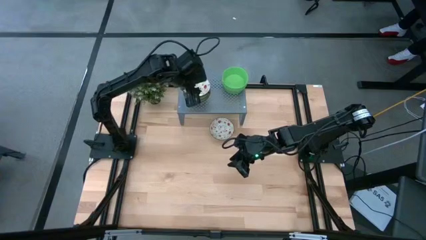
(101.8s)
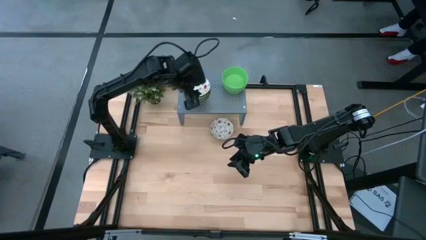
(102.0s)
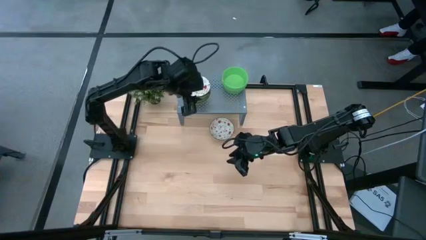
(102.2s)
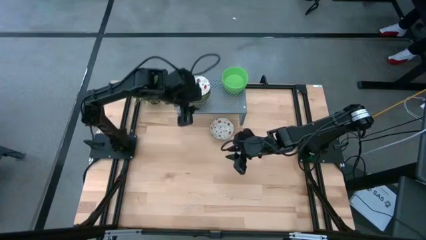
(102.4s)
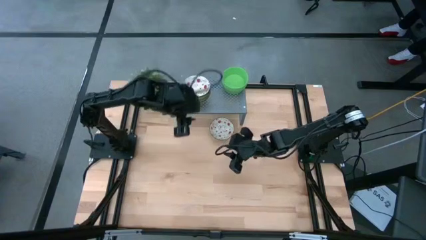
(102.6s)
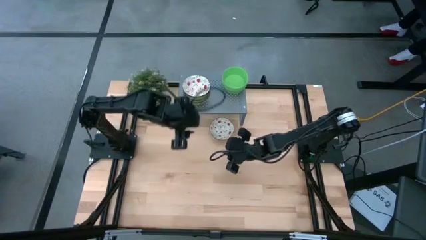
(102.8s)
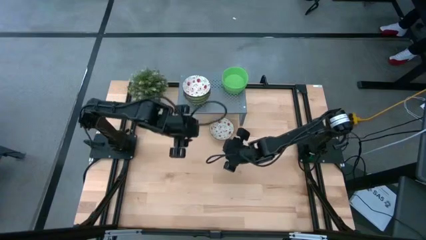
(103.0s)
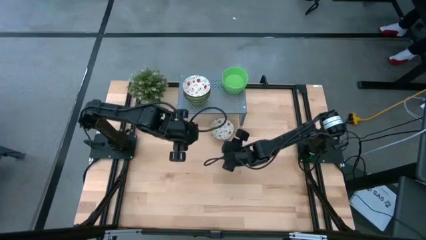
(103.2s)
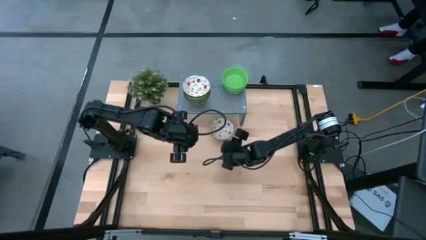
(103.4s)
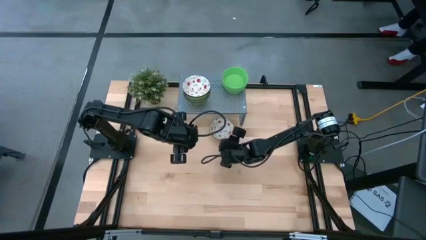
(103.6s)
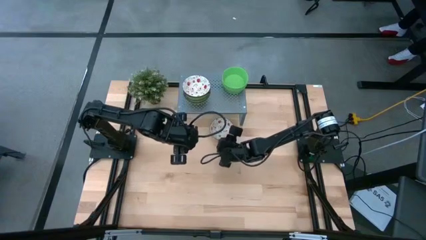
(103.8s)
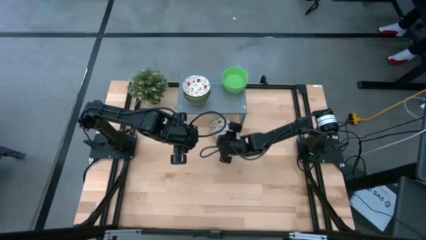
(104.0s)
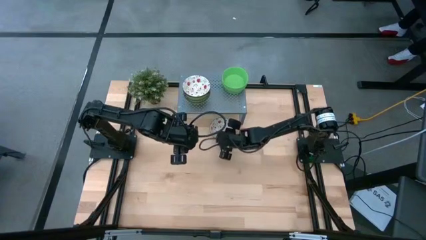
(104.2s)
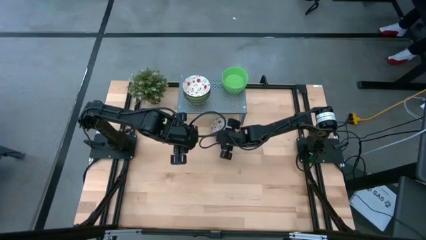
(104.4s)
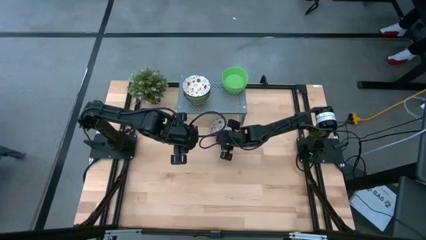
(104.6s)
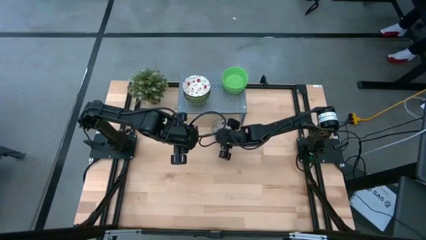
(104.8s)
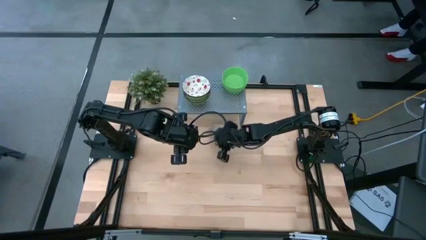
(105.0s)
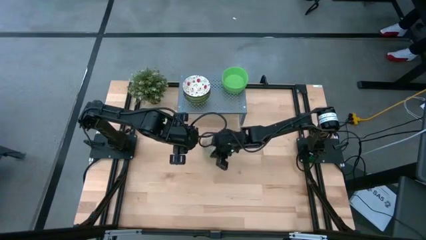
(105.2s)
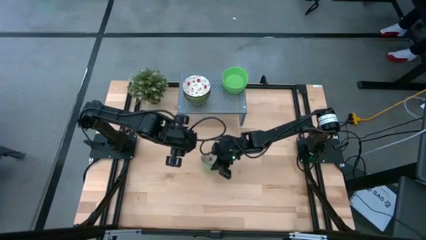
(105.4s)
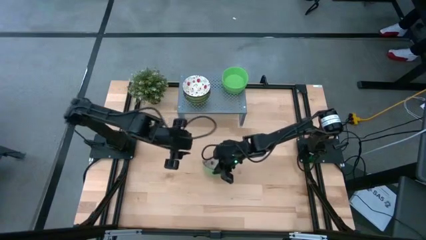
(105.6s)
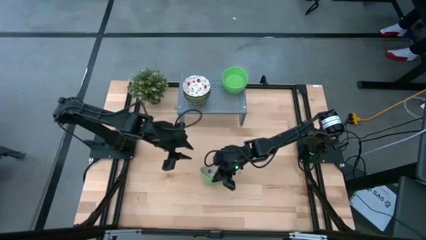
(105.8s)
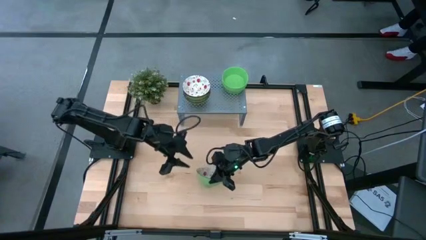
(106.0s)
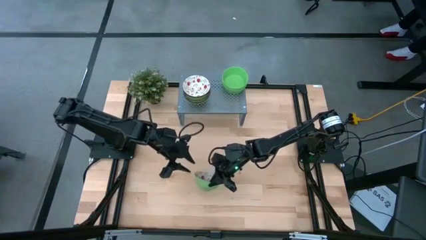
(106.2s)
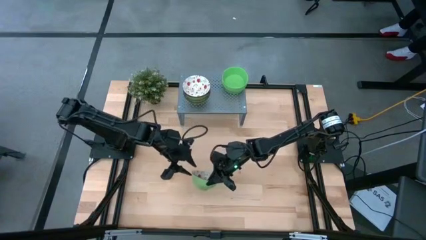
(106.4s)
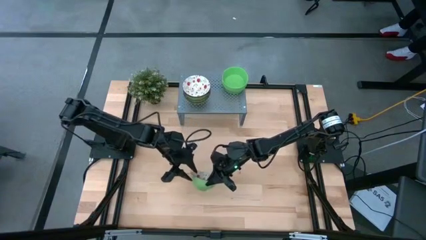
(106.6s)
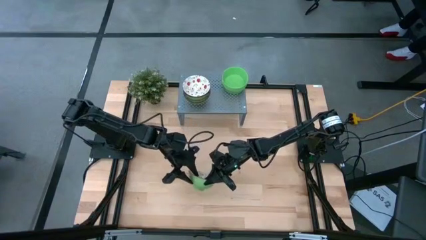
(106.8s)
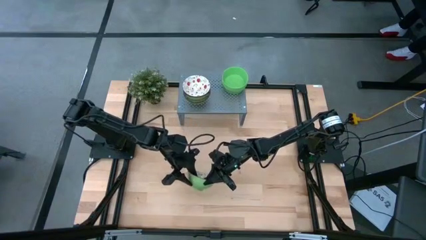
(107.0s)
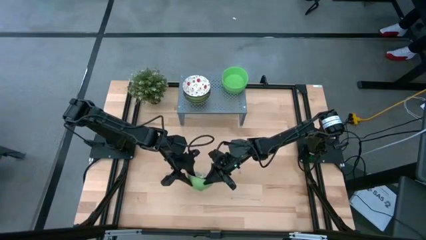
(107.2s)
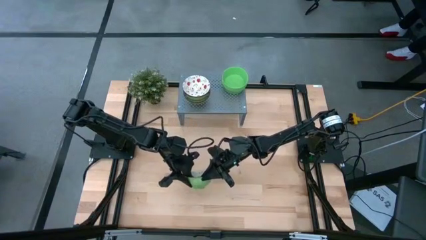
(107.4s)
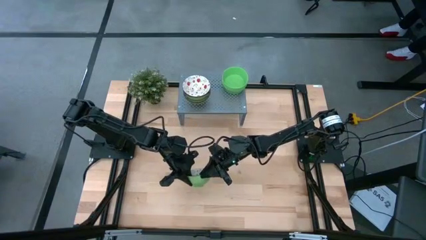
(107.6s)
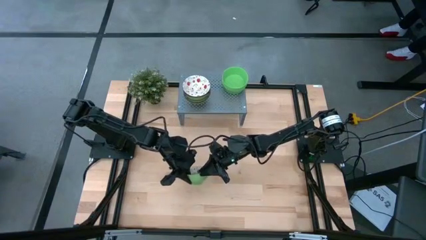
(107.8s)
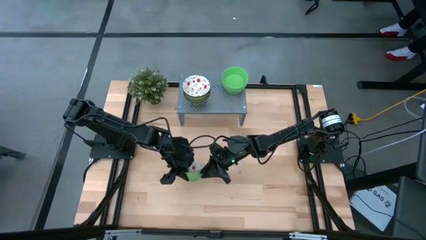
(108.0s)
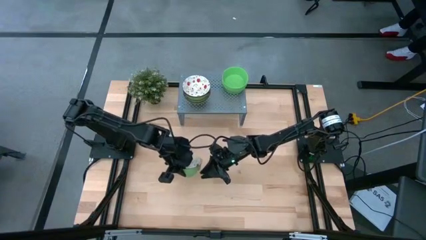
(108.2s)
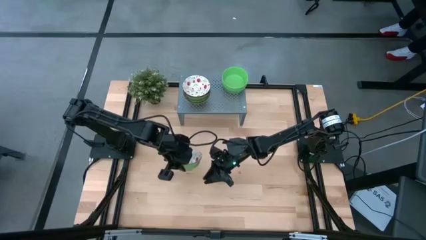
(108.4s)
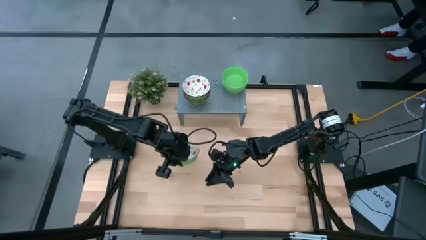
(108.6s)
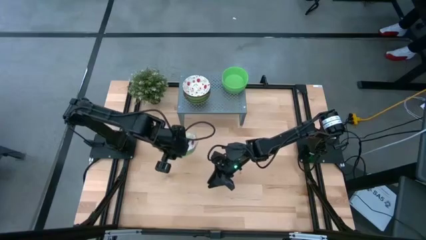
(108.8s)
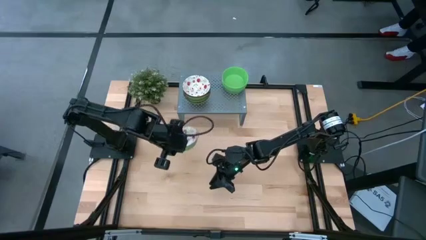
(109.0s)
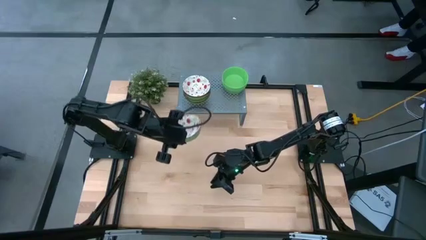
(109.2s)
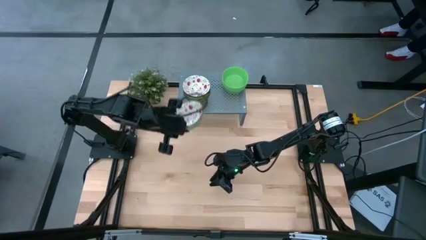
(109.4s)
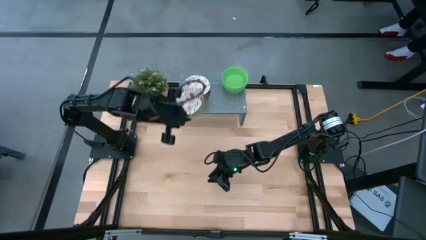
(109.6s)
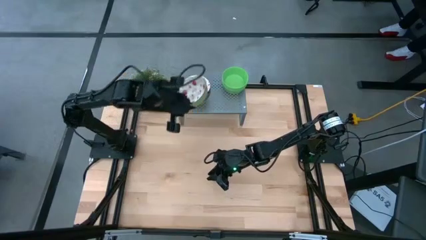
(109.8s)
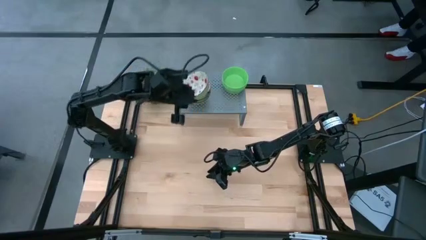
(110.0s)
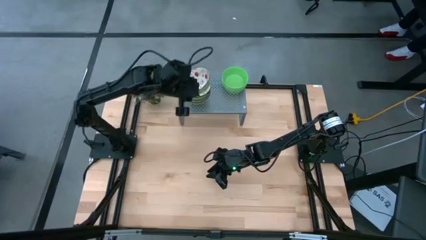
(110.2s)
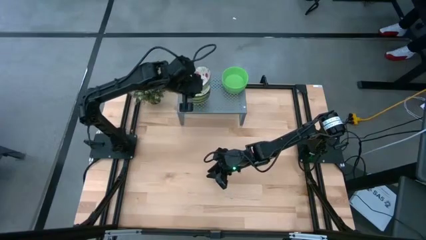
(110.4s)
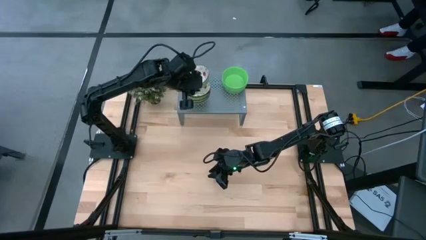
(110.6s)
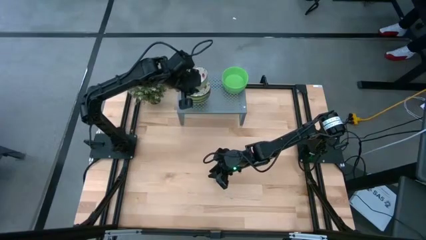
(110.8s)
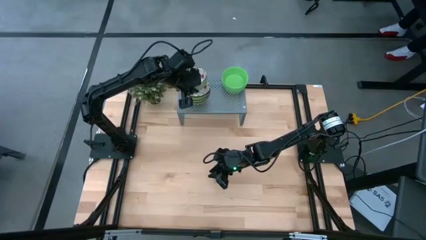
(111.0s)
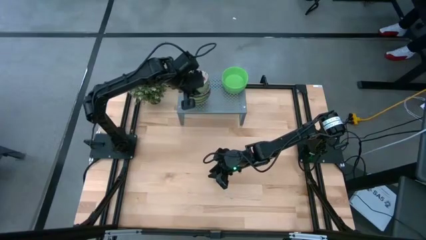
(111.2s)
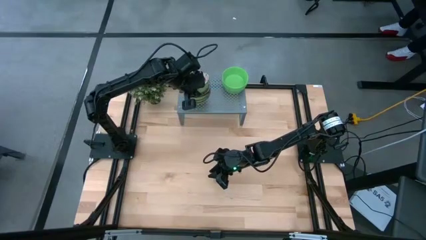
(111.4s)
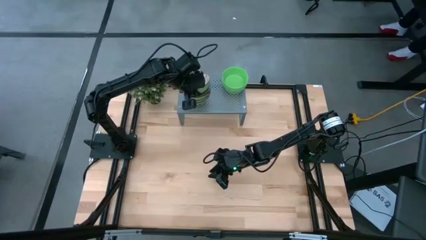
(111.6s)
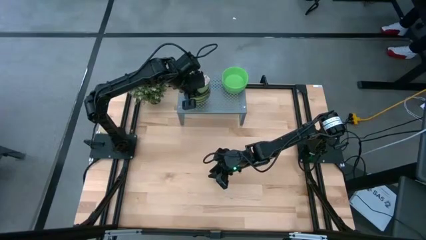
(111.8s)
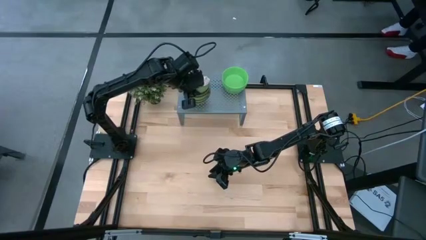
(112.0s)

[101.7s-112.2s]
Task: Pick & Place Mini bowls
Stack the green patterned bowl on the green patterned bowl

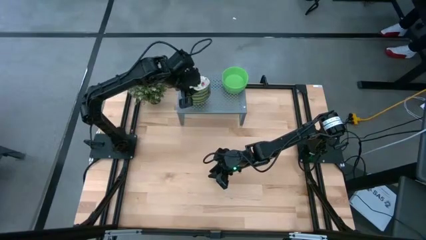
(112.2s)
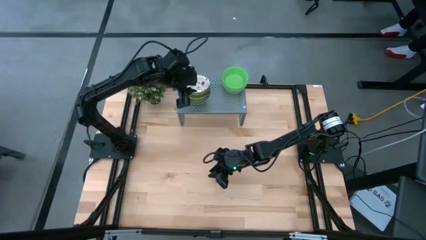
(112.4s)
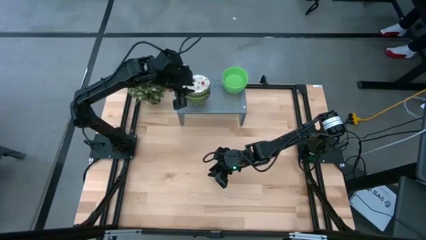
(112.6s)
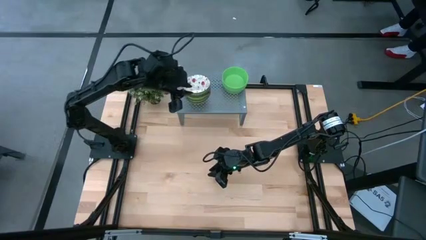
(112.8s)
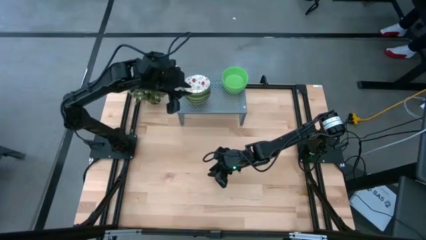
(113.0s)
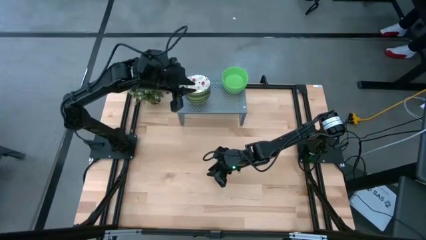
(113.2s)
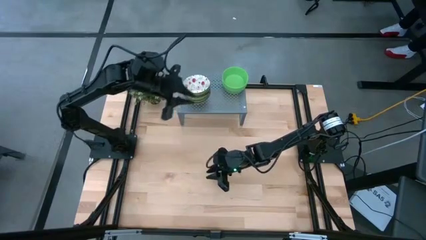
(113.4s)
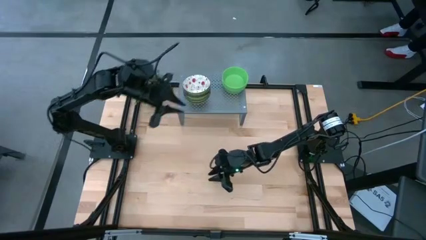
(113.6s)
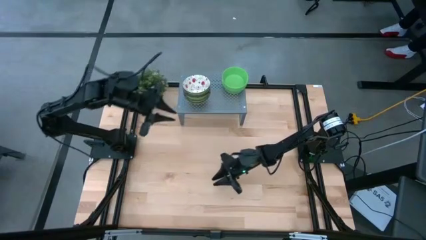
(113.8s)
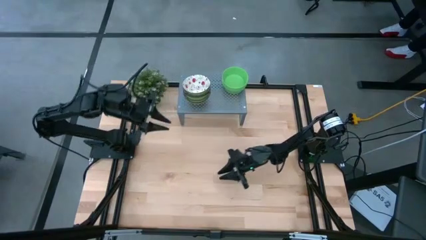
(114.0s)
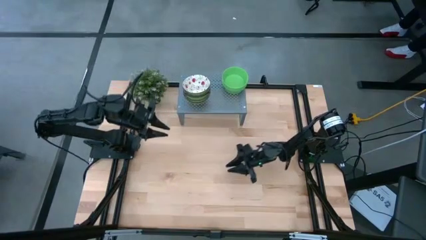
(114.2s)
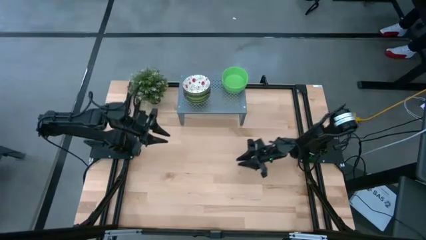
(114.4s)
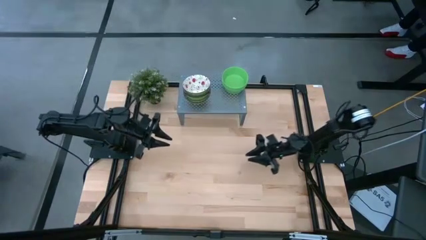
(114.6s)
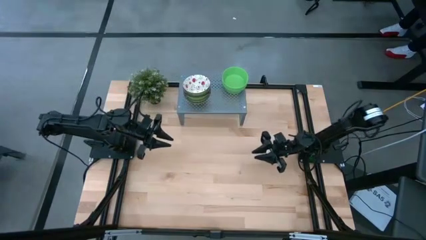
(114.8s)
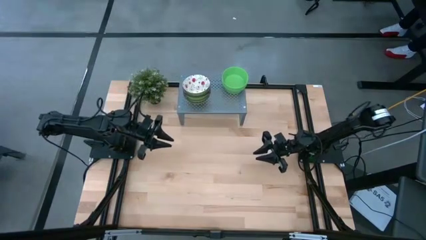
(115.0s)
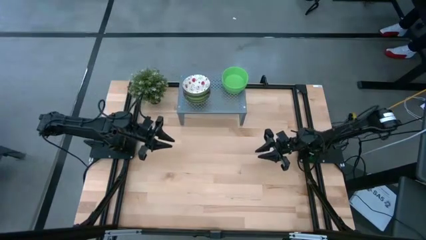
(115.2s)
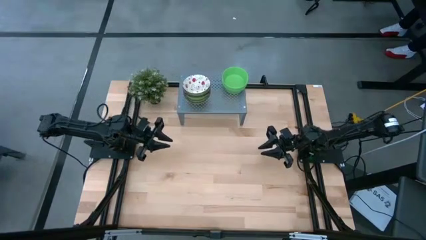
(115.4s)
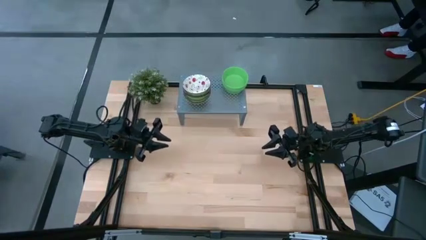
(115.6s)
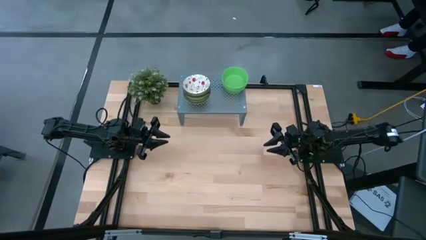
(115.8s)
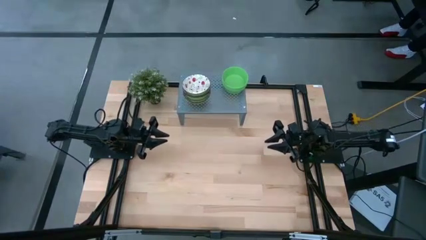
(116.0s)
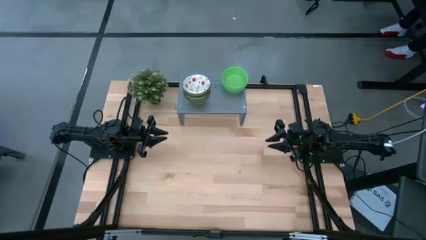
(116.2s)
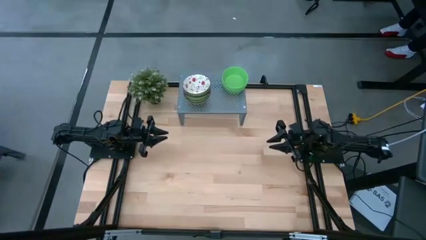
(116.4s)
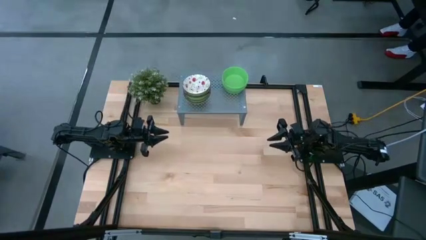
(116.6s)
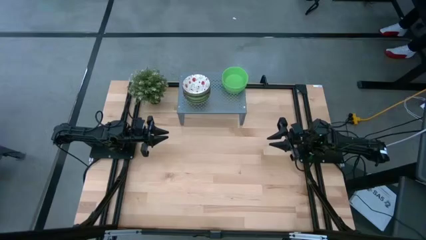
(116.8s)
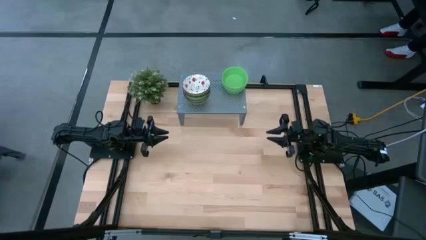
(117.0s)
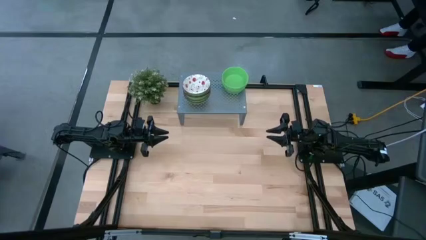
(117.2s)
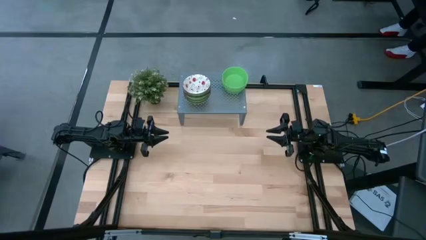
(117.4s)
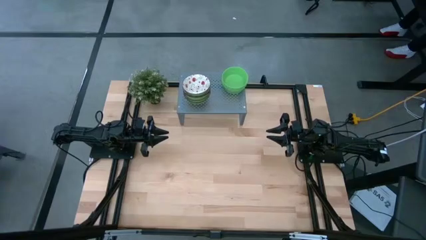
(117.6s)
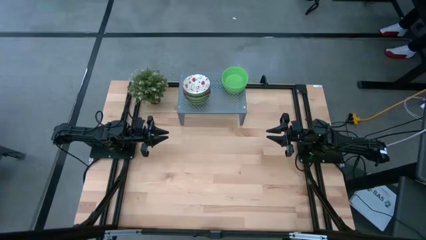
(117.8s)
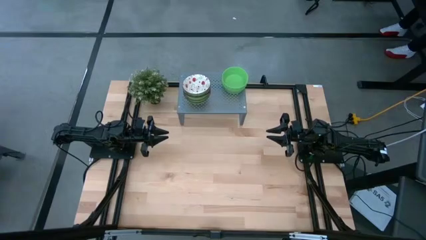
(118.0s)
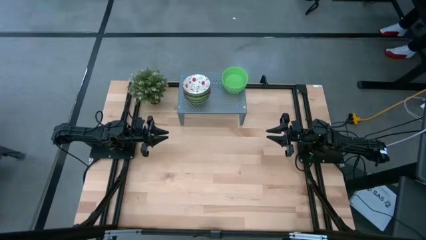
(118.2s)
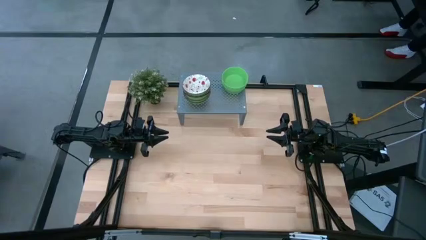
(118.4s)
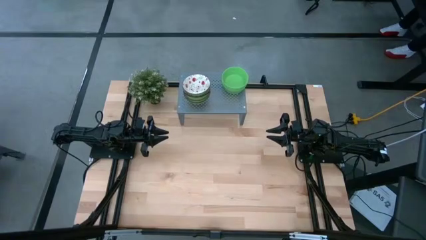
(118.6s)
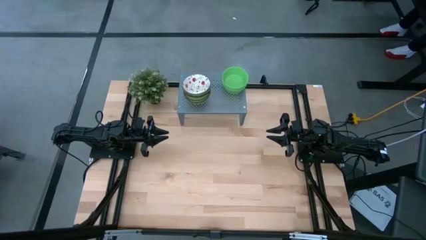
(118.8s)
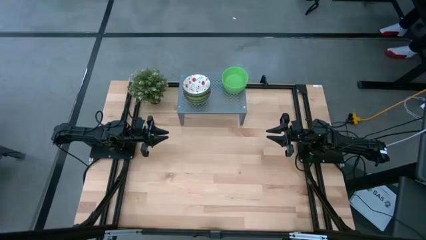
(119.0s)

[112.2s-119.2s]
Return to Home Position
